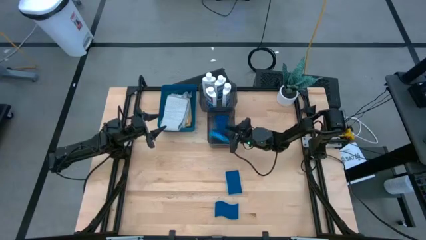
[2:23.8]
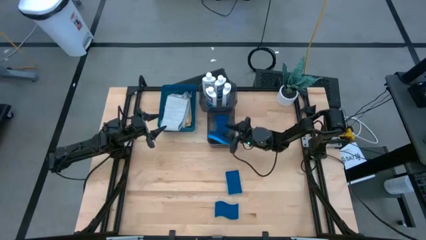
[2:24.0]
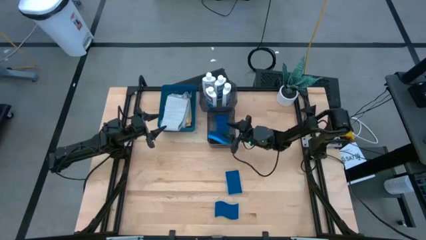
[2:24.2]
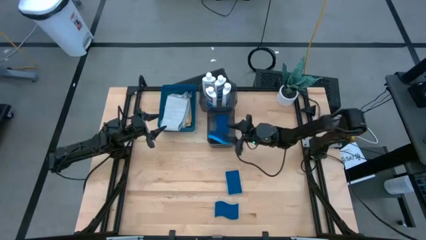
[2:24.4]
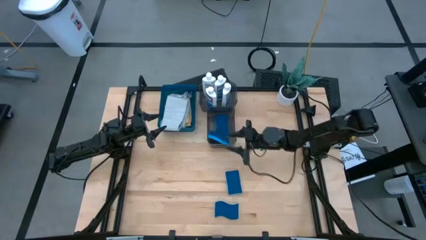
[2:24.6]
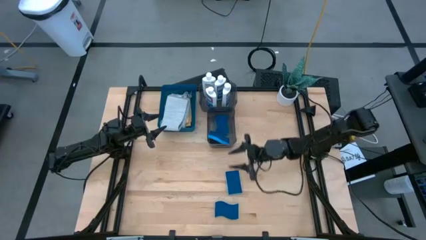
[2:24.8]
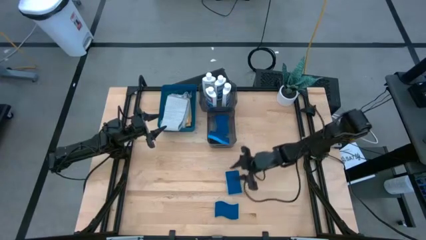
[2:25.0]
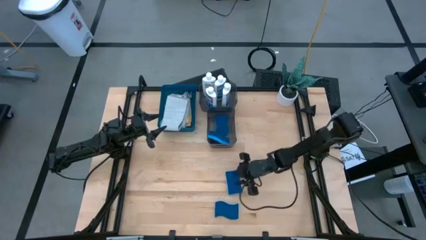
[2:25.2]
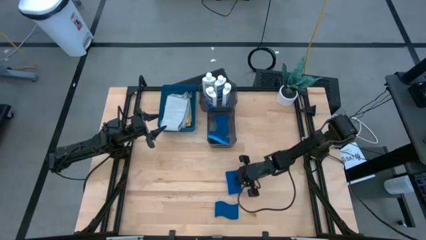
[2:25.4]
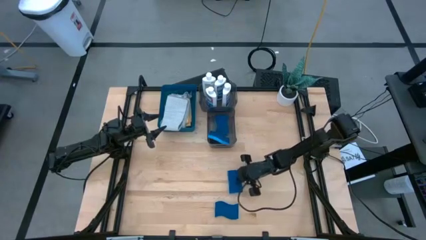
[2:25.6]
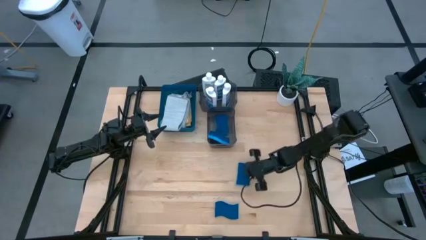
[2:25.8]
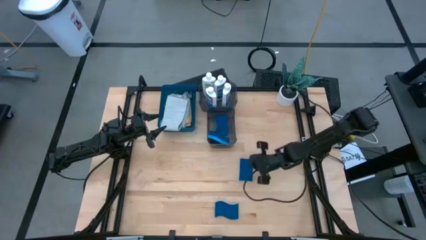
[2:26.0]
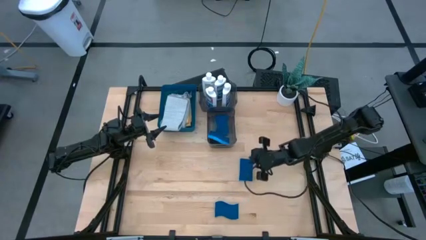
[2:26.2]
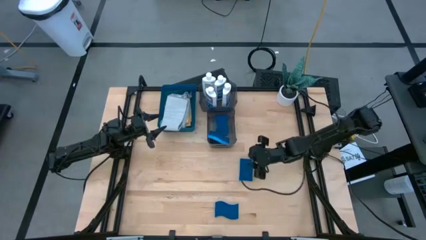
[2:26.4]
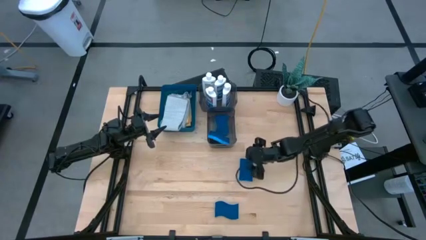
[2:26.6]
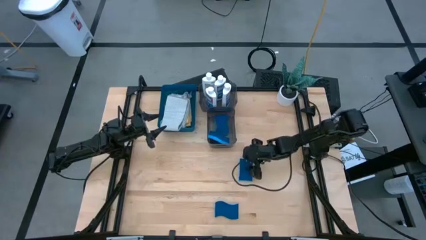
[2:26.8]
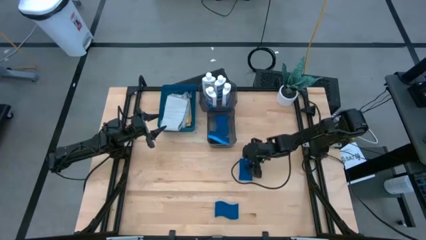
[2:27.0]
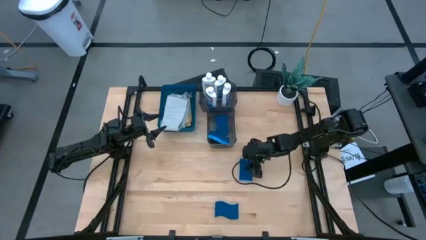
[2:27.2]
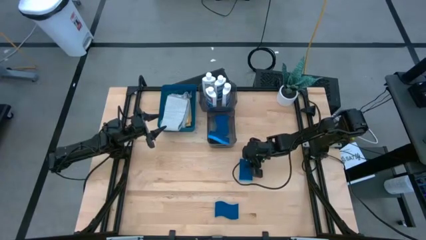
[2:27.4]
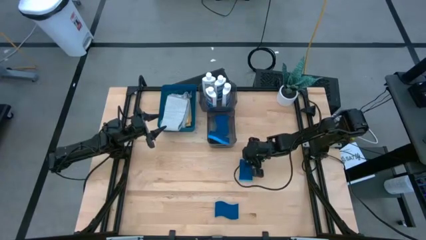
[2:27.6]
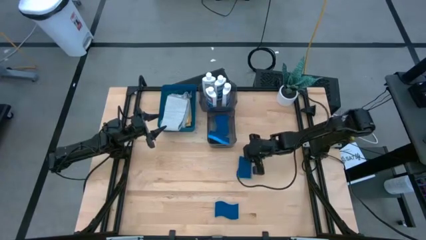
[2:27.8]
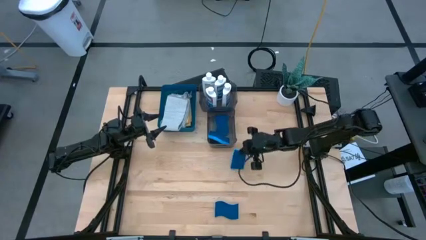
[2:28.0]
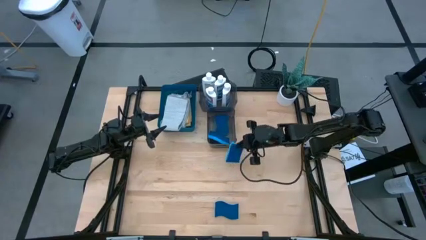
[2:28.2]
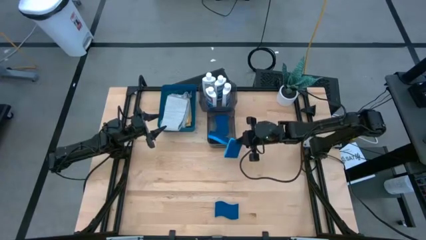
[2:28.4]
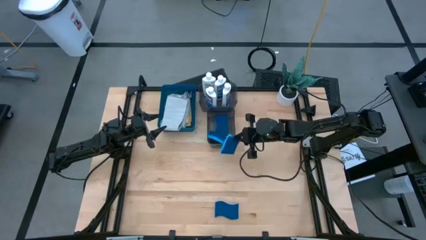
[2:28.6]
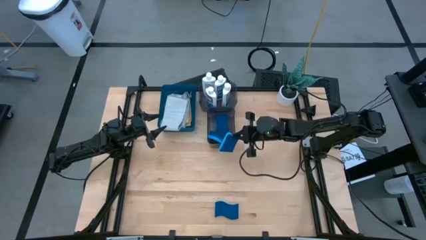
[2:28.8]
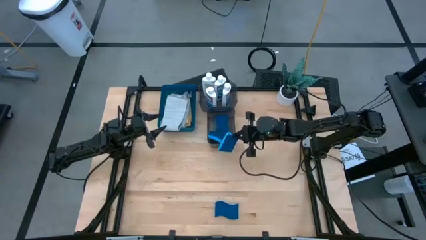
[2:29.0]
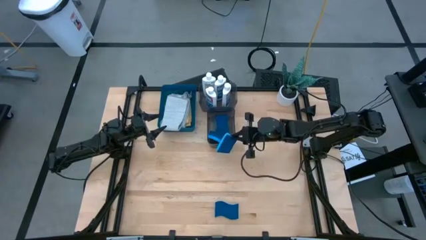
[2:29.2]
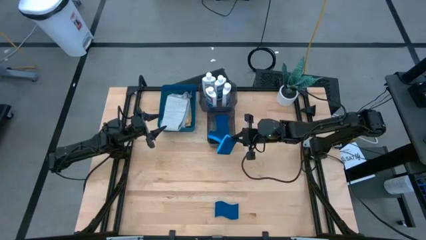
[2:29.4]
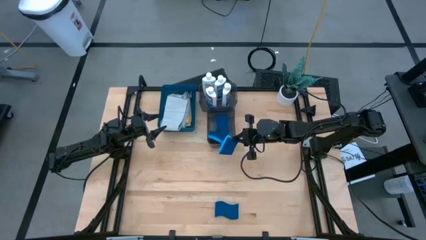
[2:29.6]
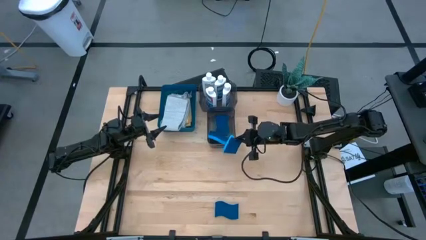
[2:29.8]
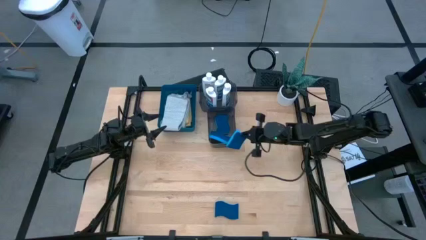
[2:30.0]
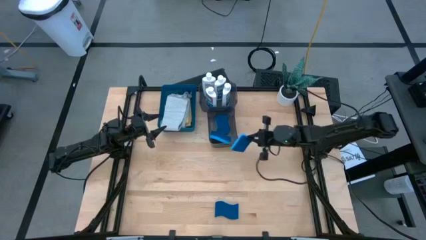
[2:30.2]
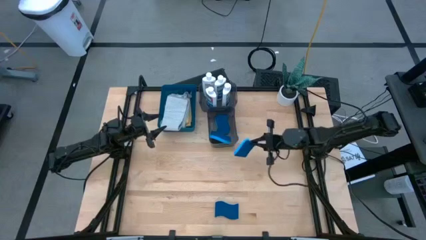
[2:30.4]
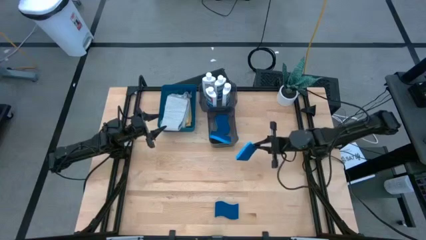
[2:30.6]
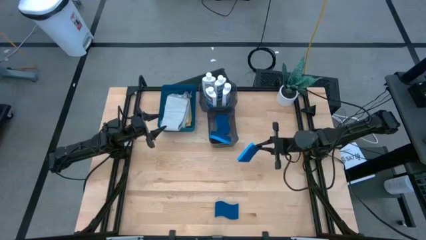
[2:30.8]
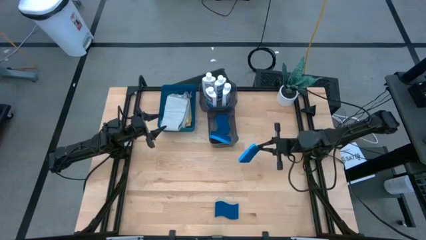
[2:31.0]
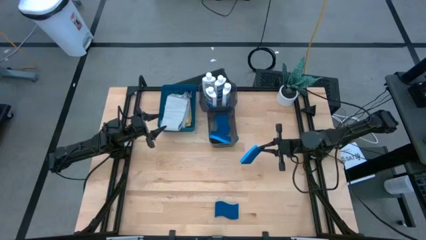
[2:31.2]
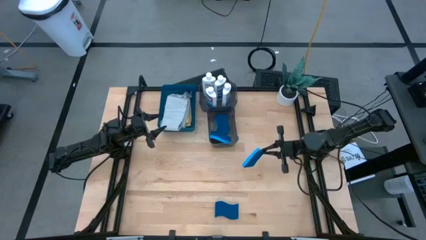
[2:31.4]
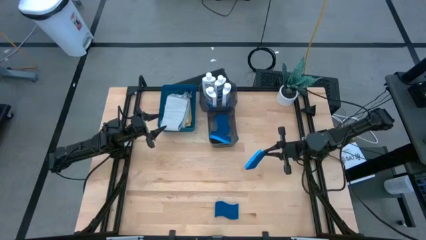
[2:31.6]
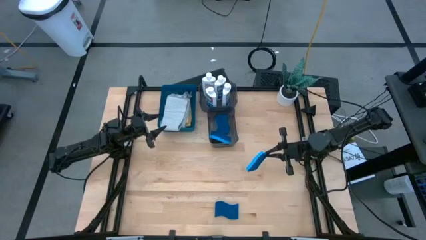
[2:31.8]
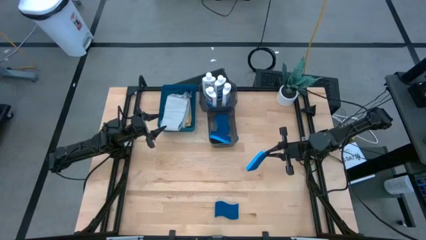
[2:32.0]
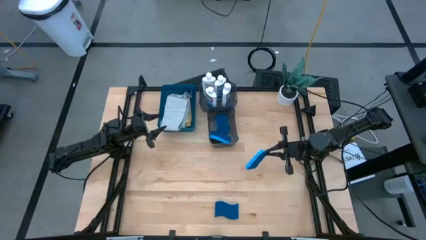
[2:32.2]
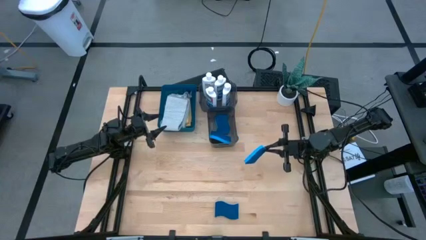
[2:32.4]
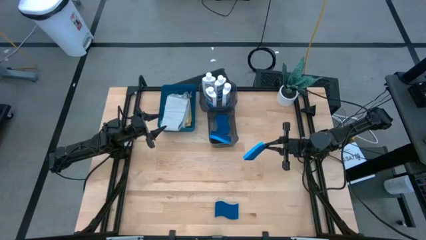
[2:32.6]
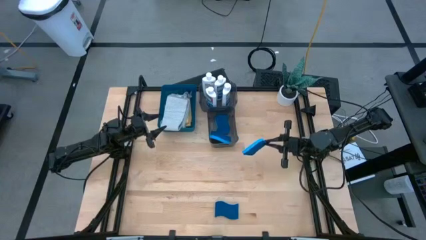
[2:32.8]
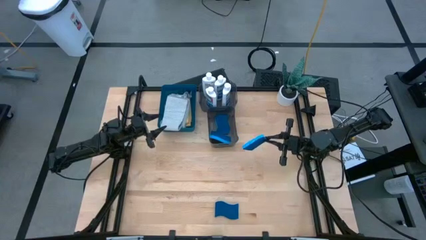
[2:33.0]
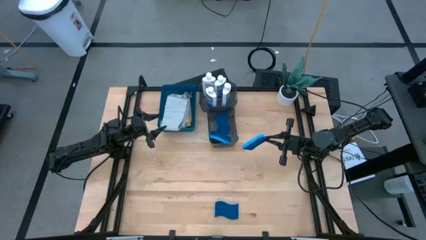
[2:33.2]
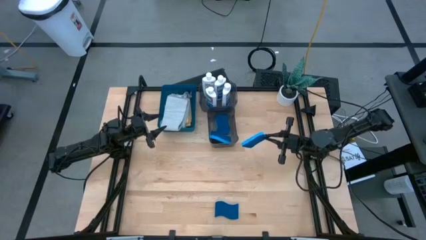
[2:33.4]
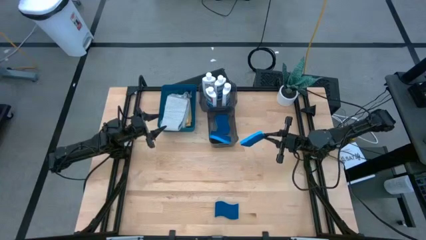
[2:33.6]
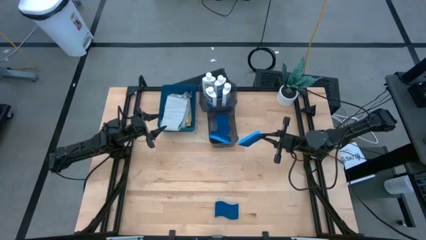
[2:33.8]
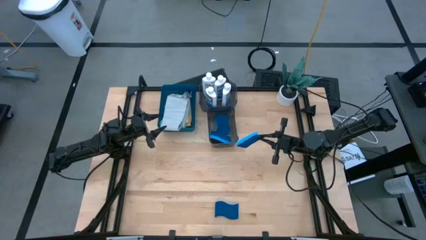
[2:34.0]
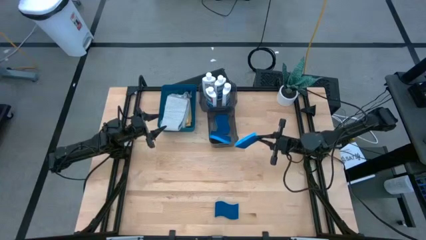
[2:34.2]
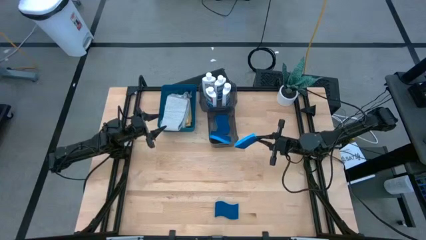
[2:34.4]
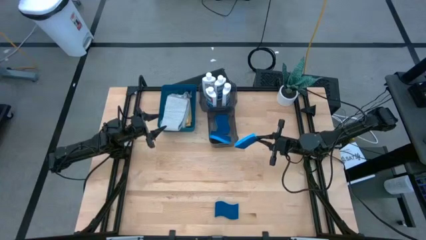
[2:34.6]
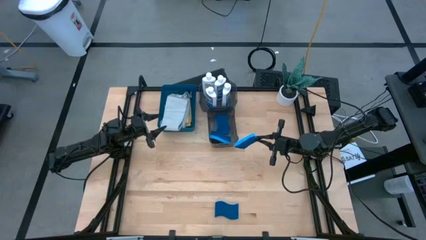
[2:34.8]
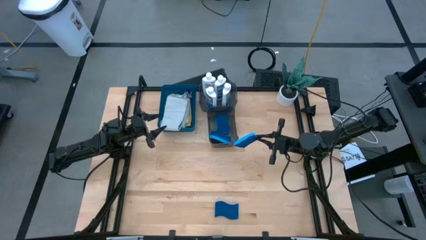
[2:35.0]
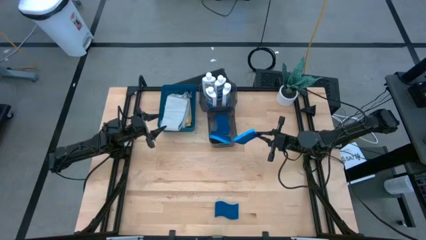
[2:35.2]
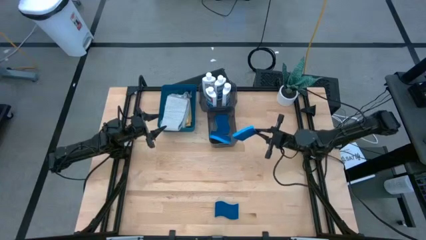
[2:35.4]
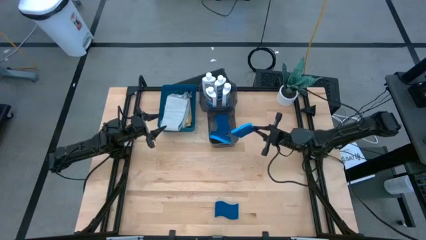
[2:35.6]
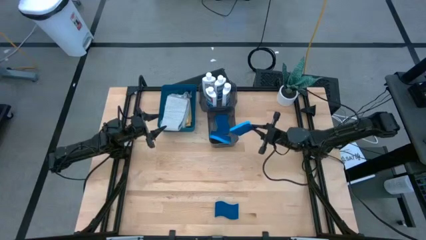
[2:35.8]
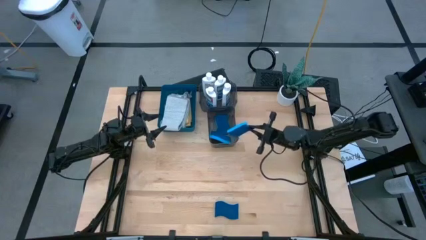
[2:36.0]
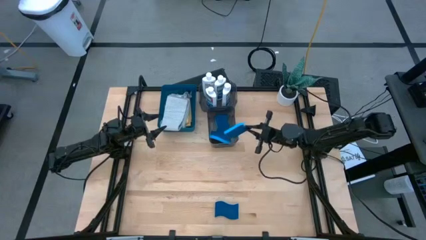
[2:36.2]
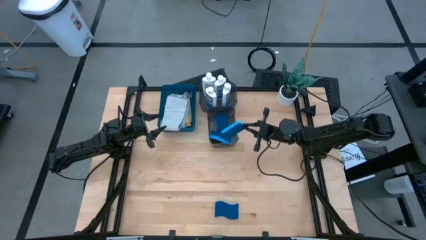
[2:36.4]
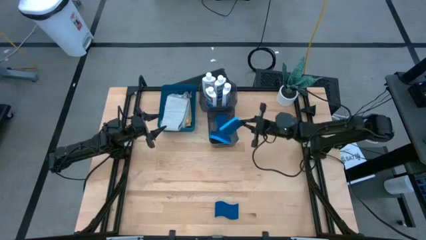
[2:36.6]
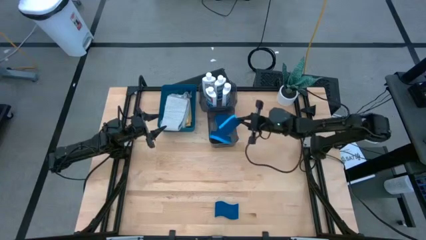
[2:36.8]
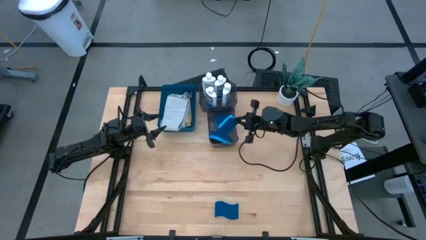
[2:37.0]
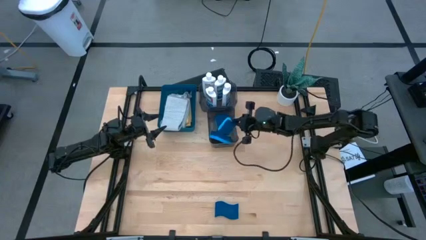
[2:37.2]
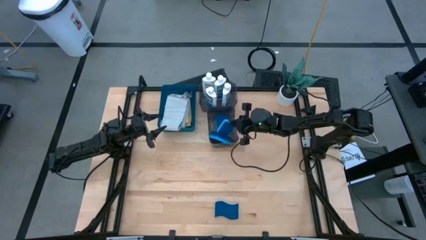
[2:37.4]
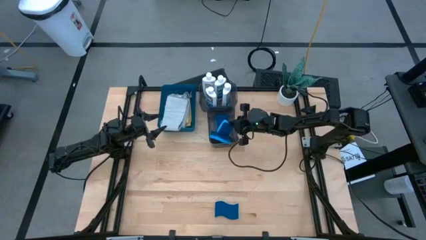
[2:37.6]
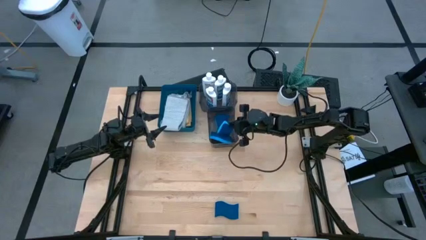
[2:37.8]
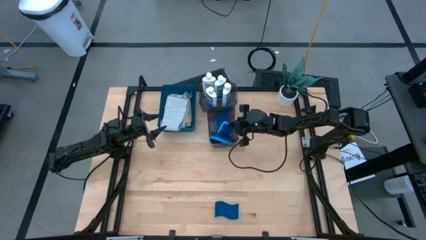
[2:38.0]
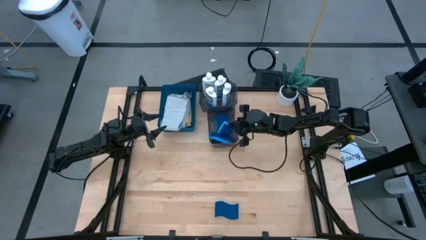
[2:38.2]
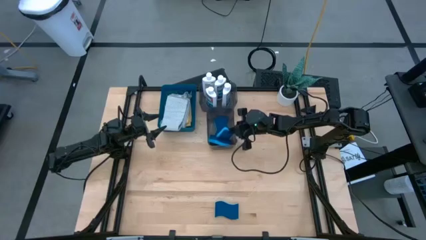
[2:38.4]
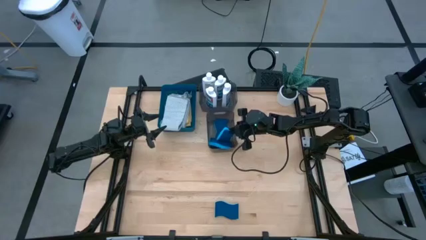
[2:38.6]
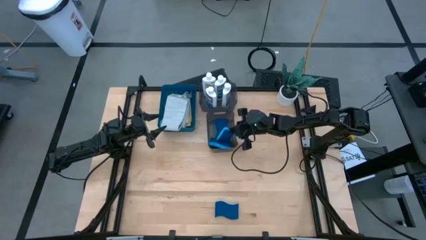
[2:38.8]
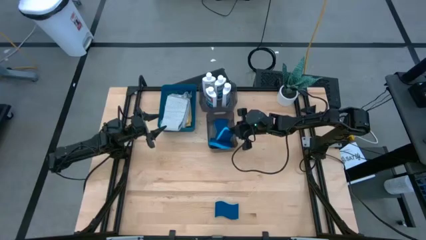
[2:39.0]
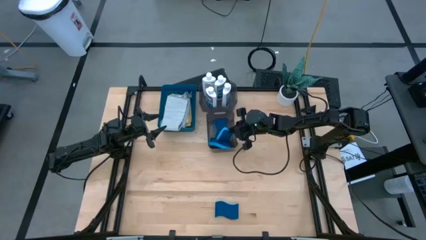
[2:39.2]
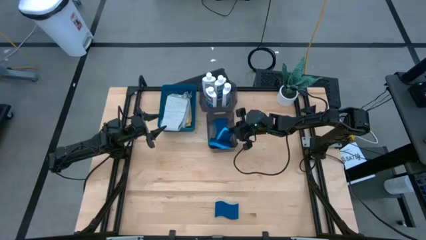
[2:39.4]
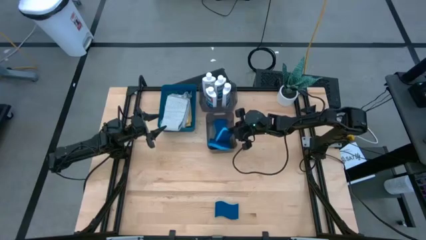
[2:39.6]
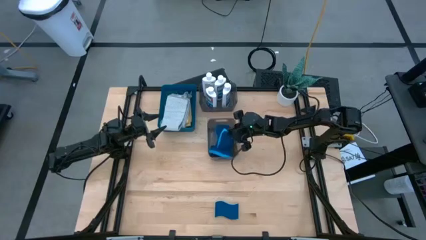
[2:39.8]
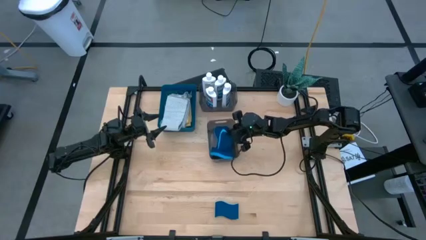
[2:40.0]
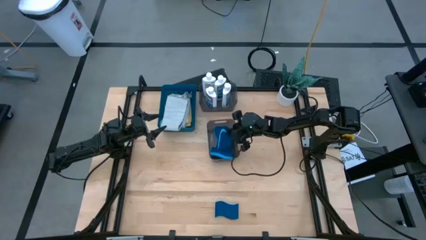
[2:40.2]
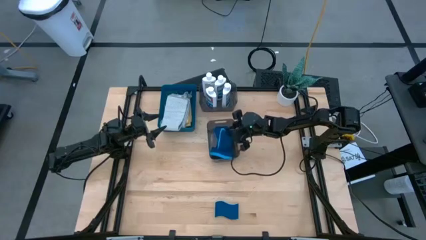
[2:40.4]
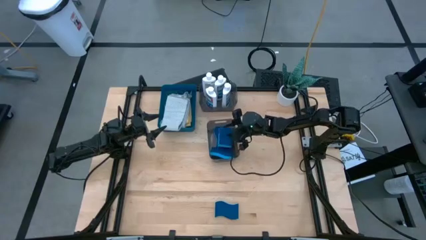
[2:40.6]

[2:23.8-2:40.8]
Task: Pick & Place Kitchen Items
Put the blue sponge into the bottom black bin
